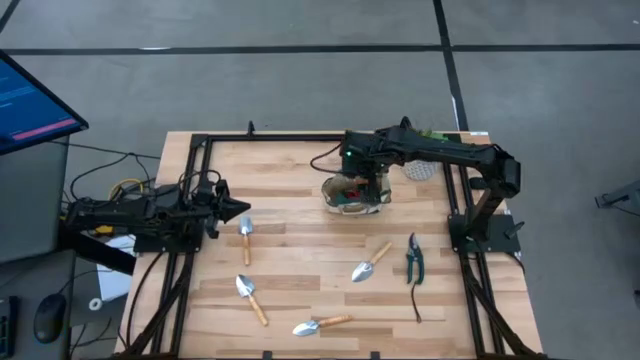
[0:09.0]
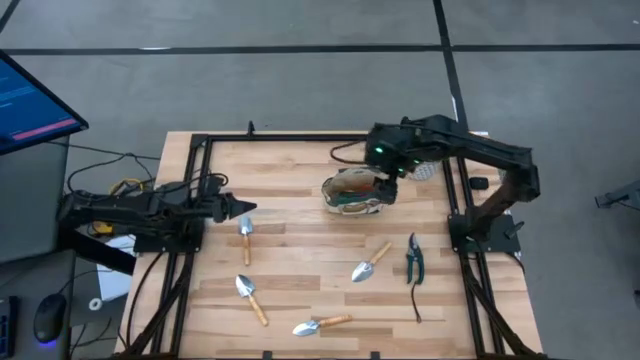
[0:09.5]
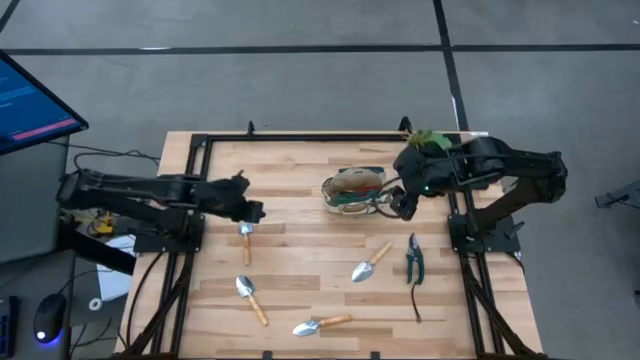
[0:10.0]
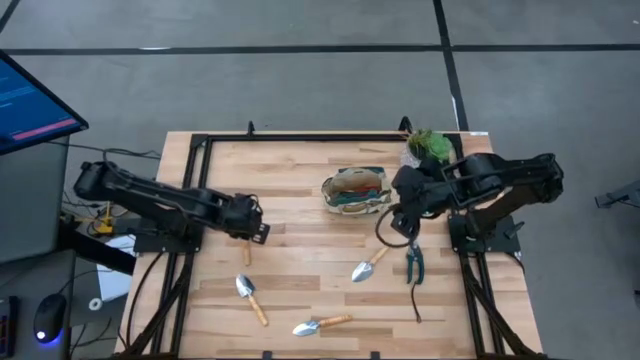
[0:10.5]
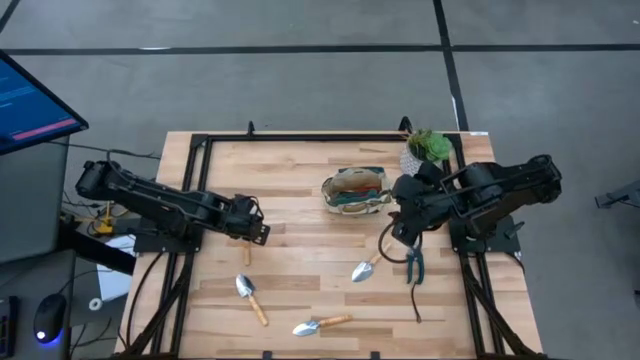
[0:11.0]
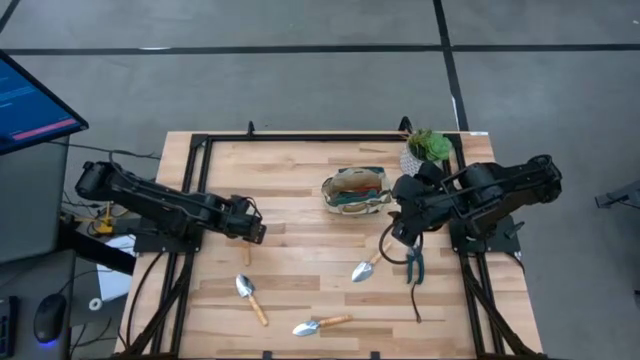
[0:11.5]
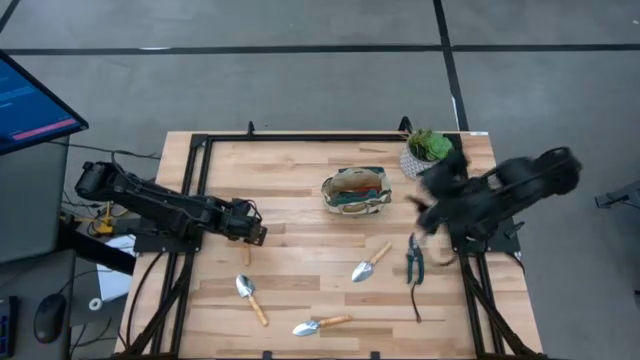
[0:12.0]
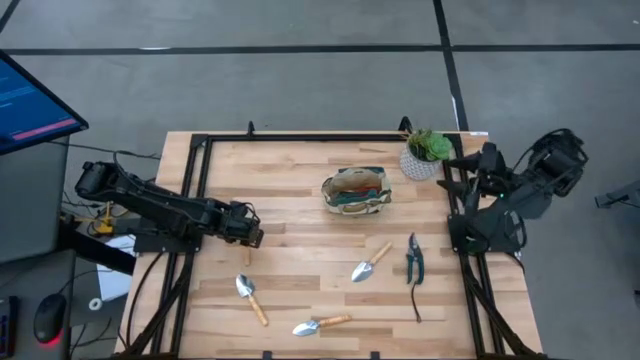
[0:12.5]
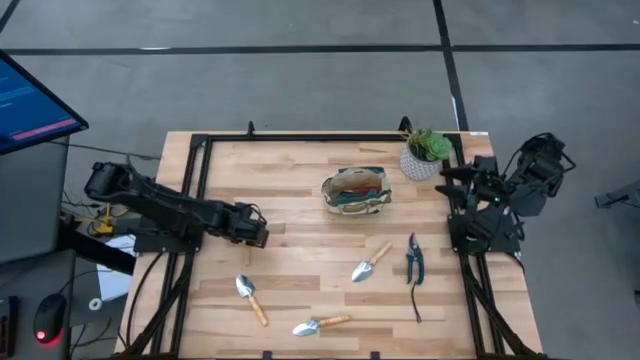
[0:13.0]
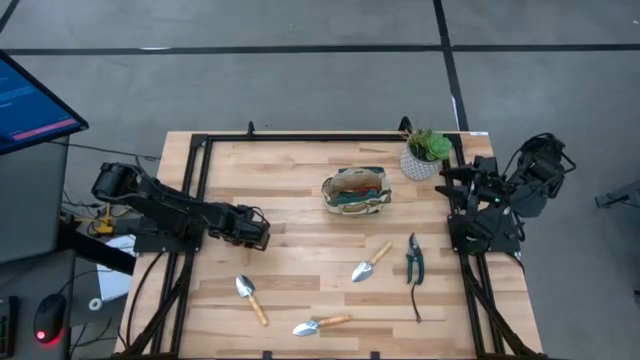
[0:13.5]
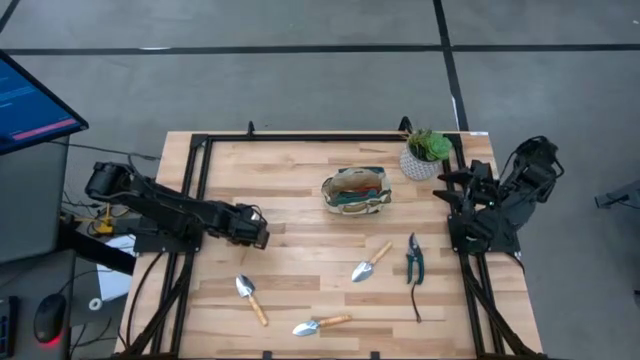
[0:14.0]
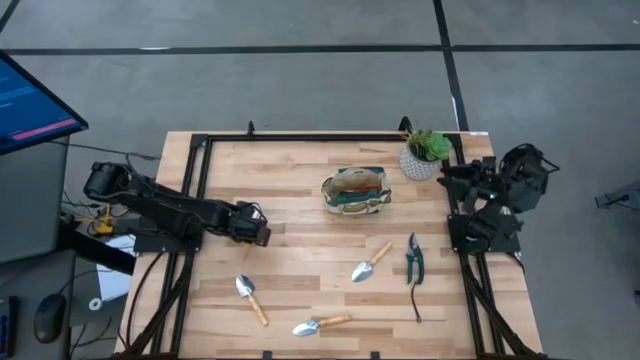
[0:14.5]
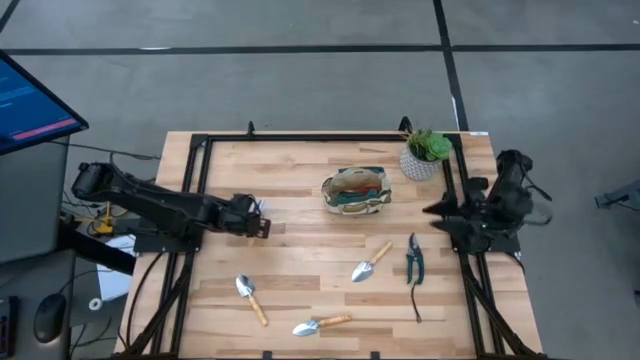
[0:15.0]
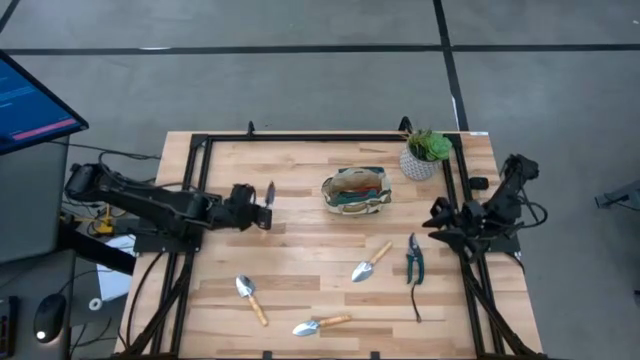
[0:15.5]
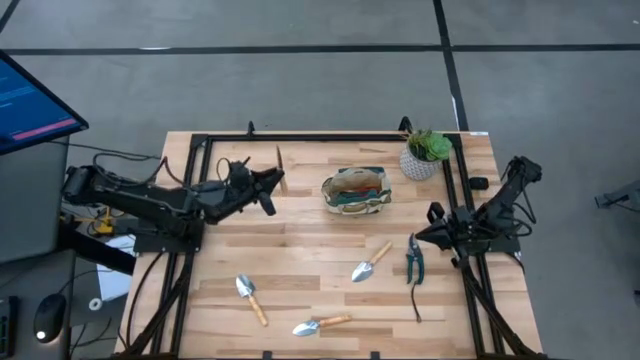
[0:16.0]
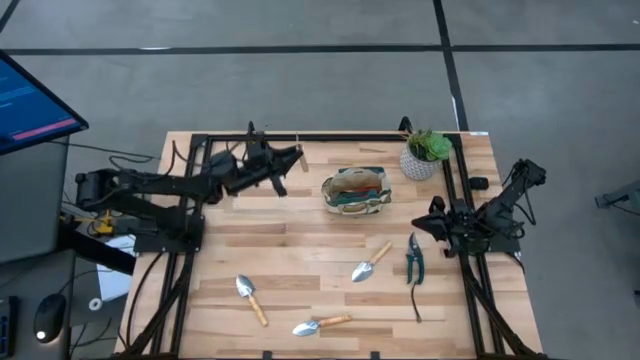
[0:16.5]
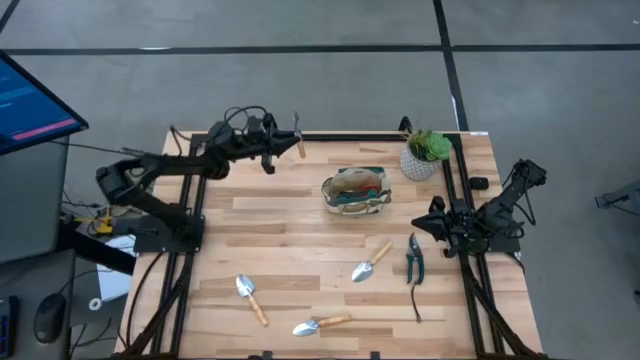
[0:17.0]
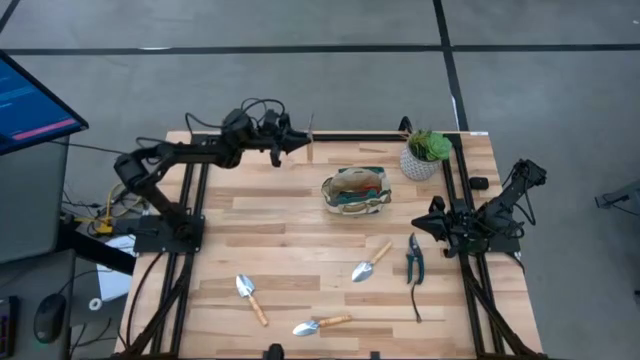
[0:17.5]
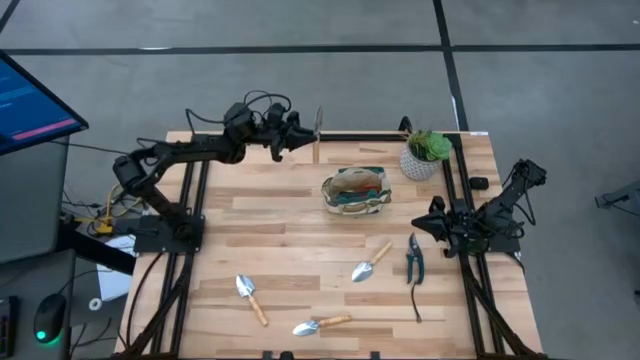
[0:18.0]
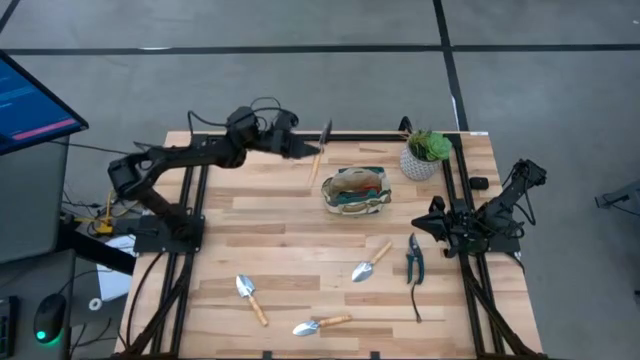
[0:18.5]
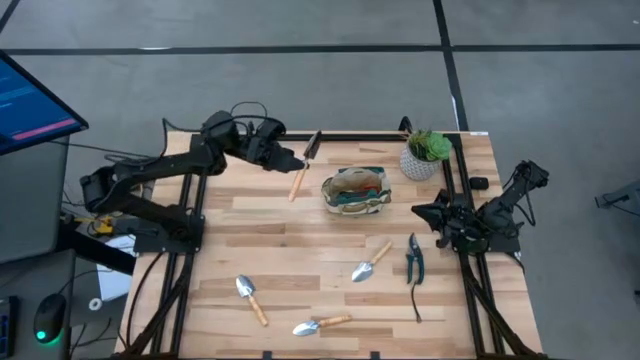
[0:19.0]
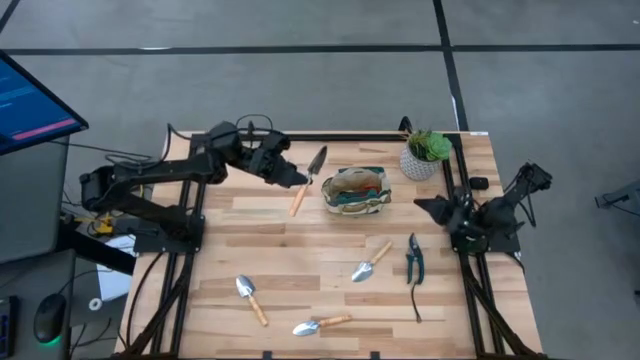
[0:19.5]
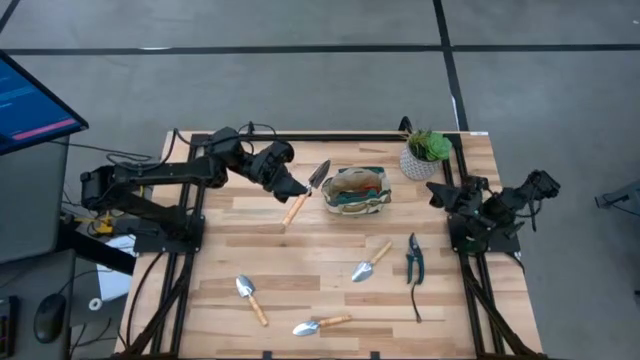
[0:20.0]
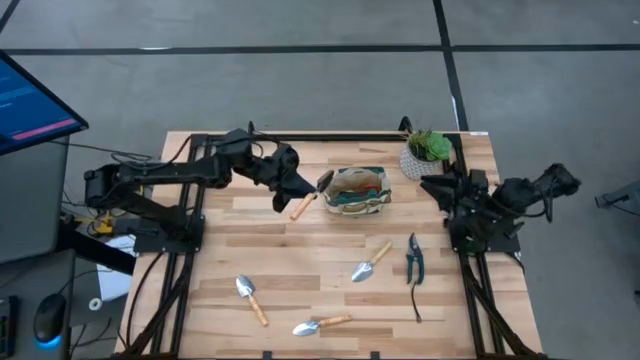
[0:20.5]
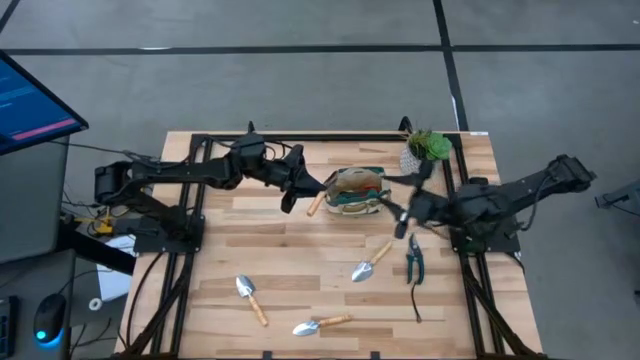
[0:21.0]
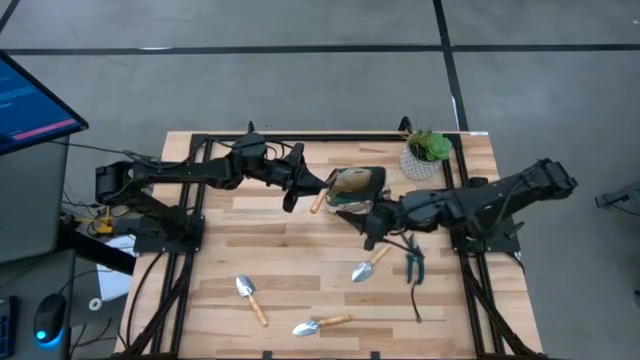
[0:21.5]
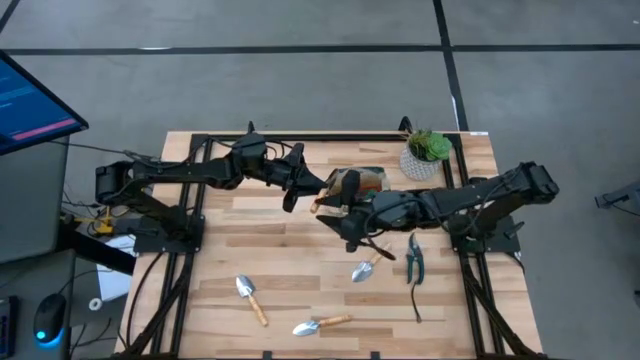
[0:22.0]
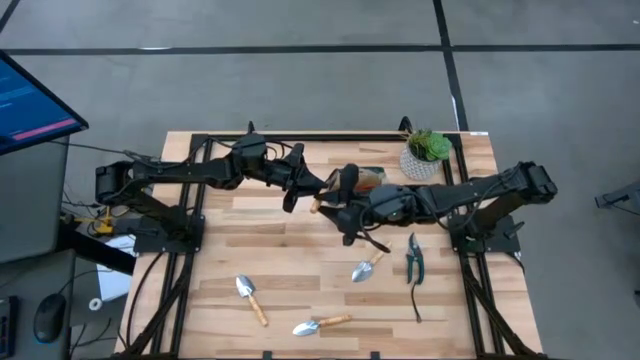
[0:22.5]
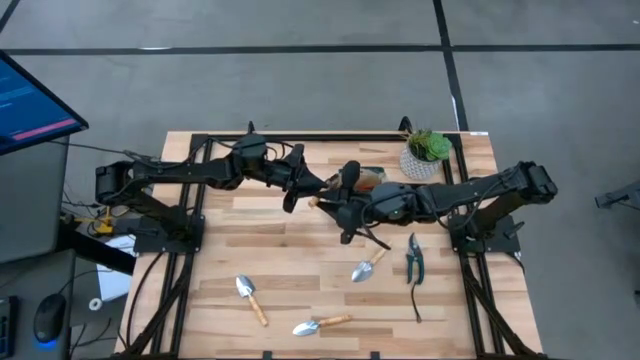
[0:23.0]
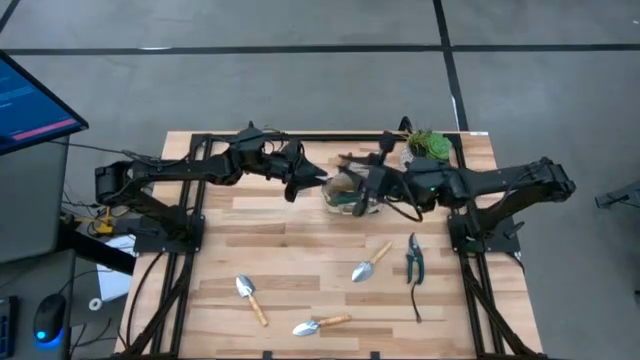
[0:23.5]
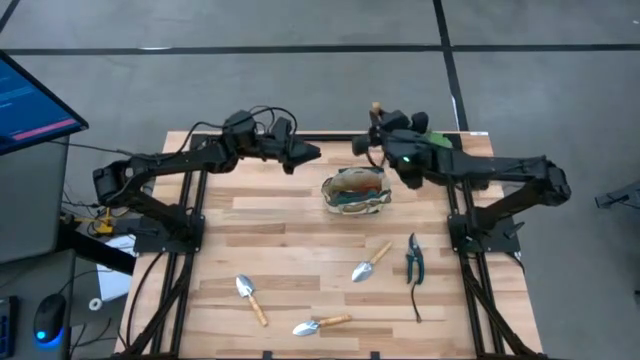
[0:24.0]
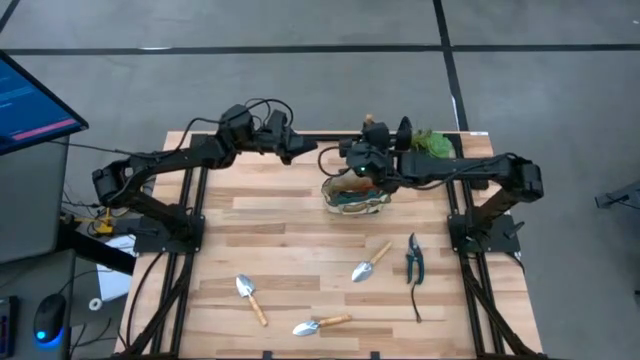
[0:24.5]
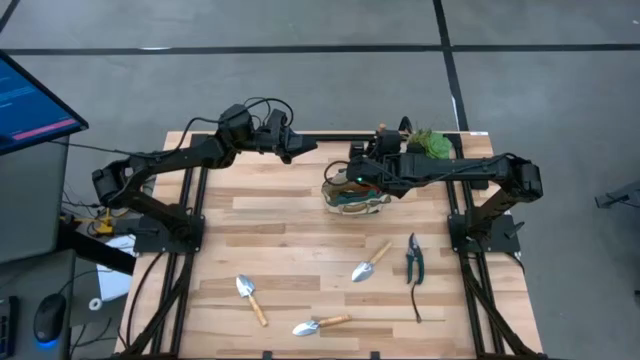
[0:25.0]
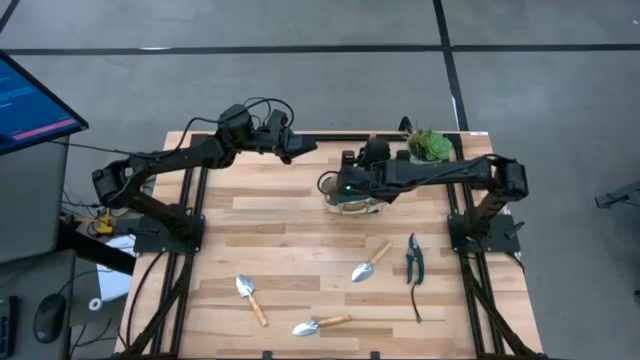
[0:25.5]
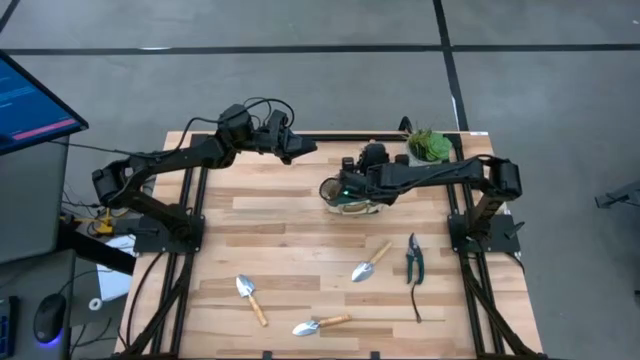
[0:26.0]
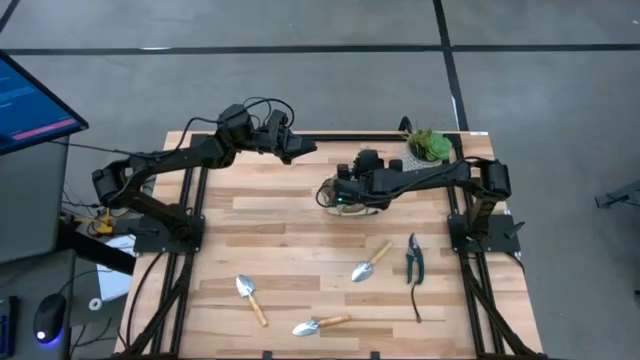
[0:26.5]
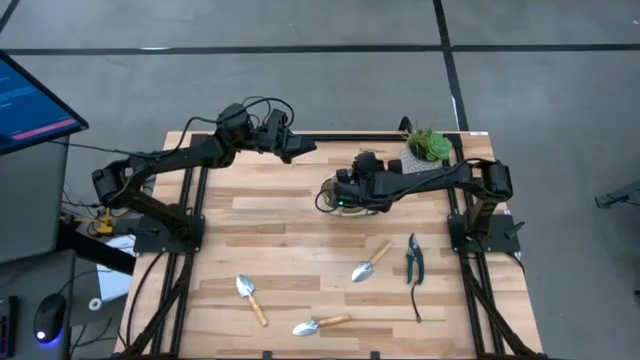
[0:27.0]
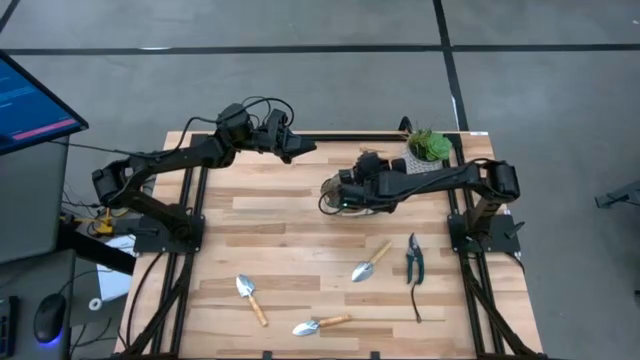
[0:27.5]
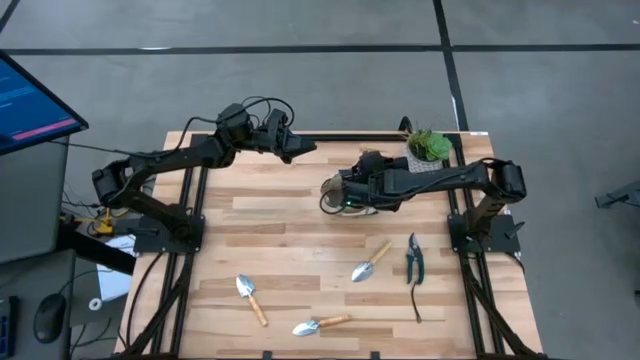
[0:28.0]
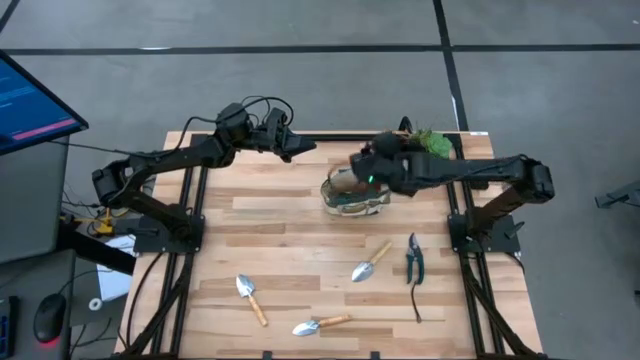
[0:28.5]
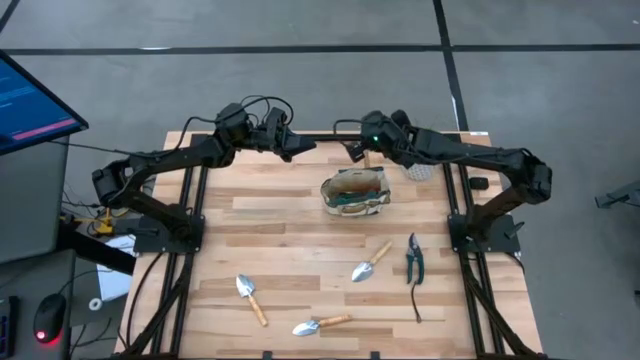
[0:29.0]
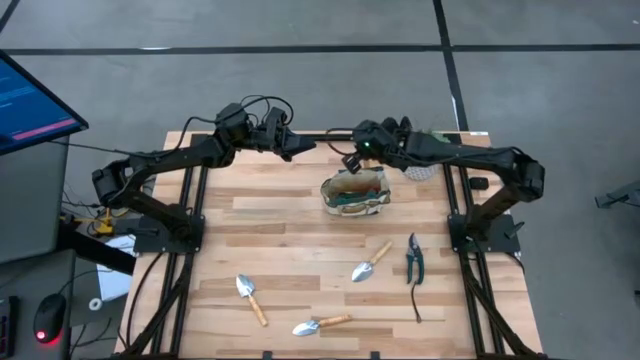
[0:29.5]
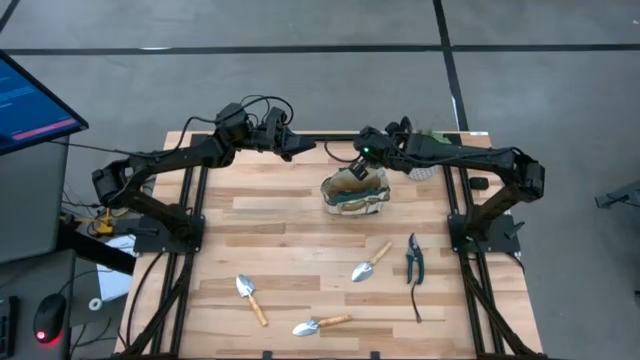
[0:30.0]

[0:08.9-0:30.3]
Task: Pick & Place Garden tools in Gardening bag
Put the trowel into the gardening bag
